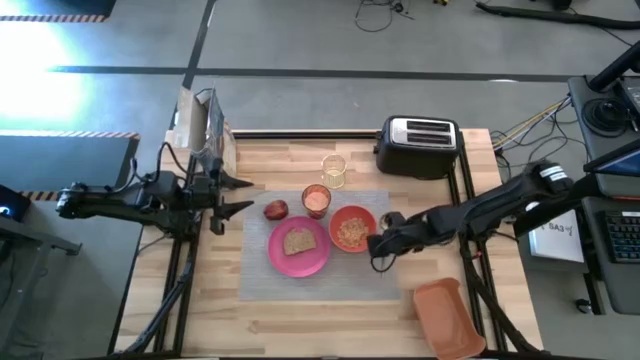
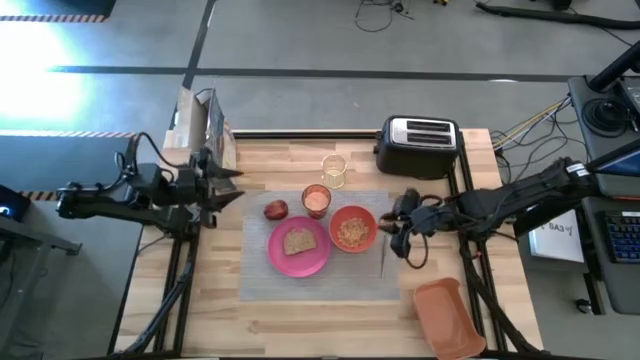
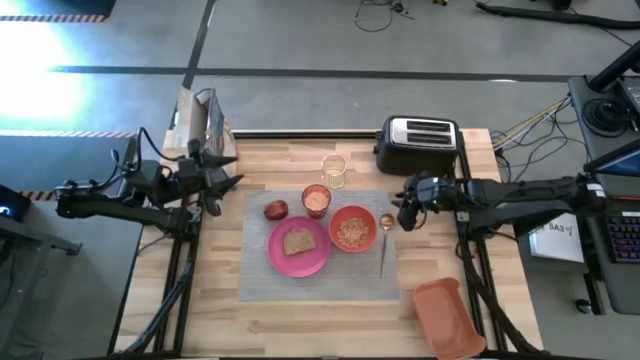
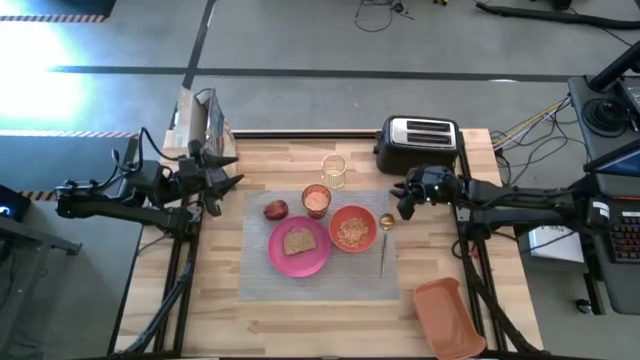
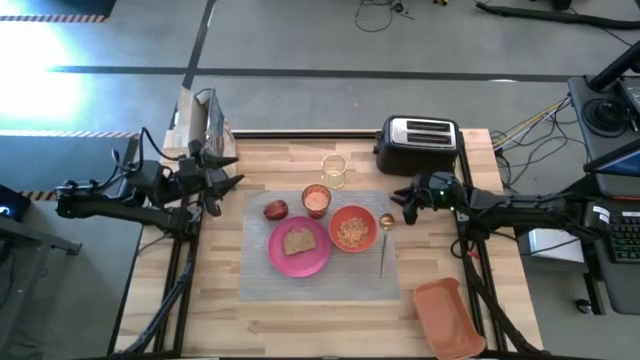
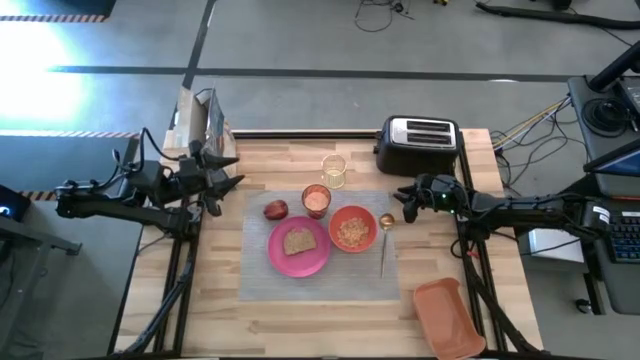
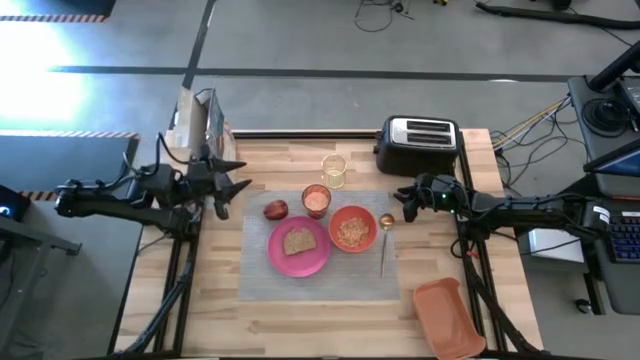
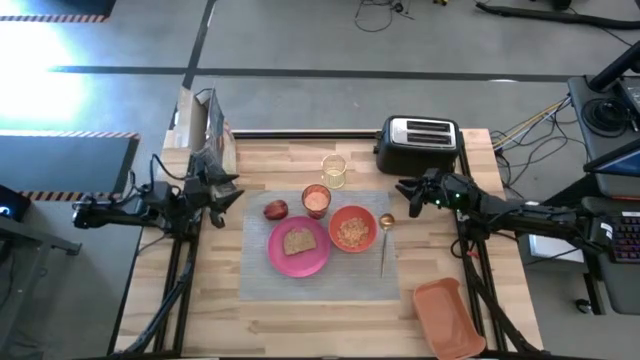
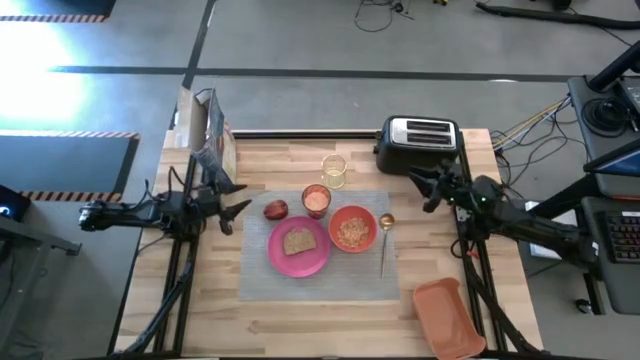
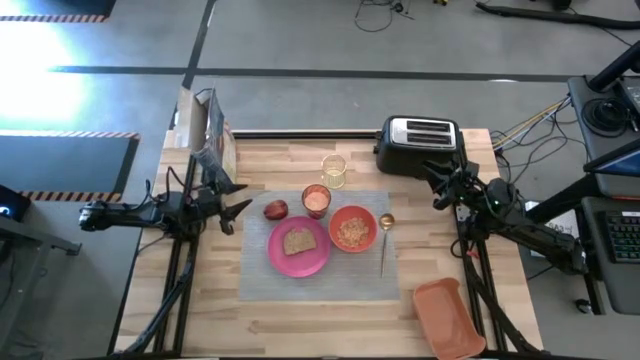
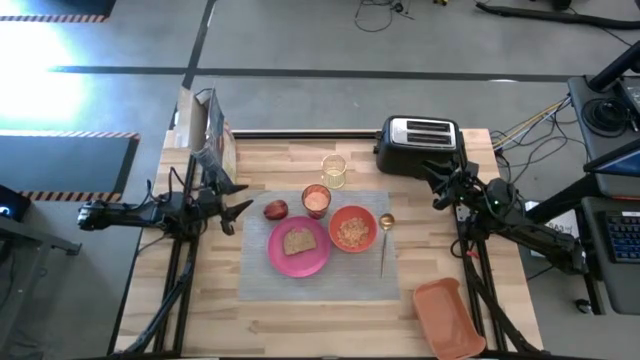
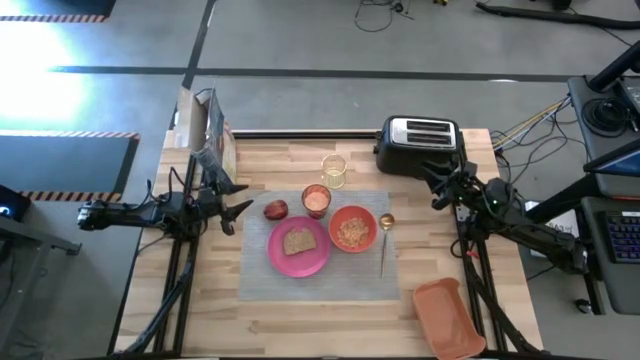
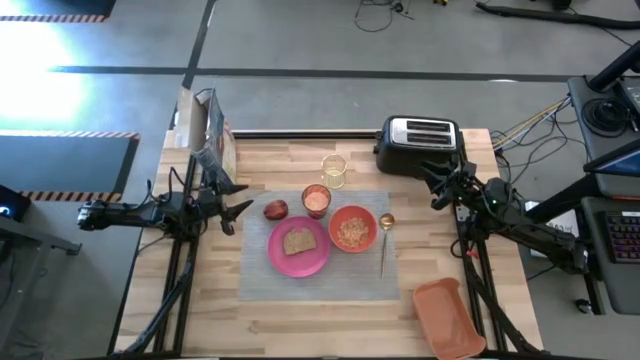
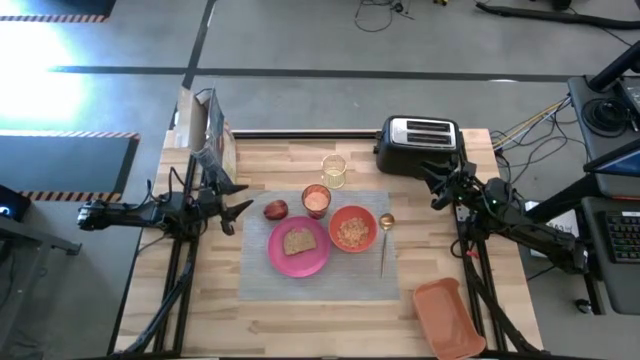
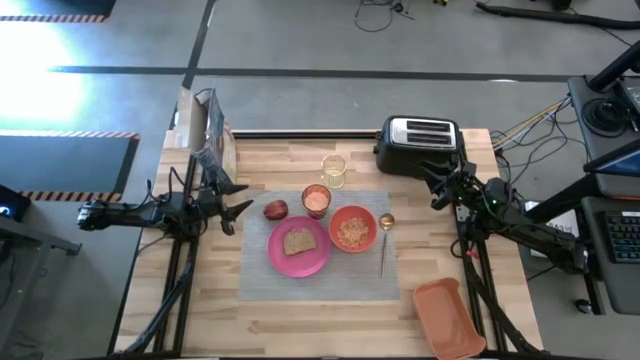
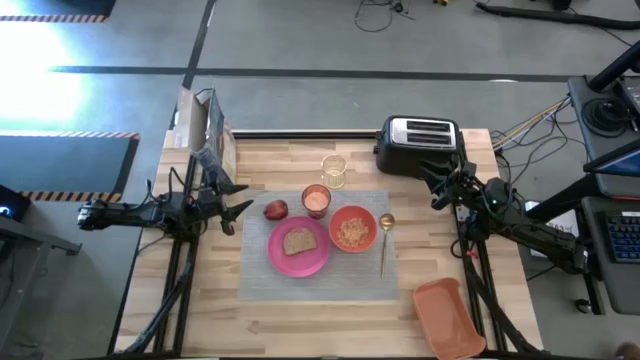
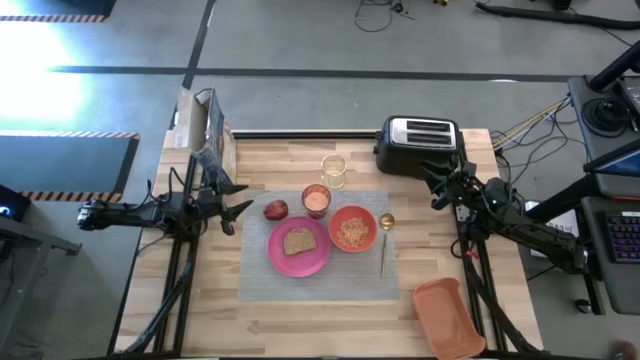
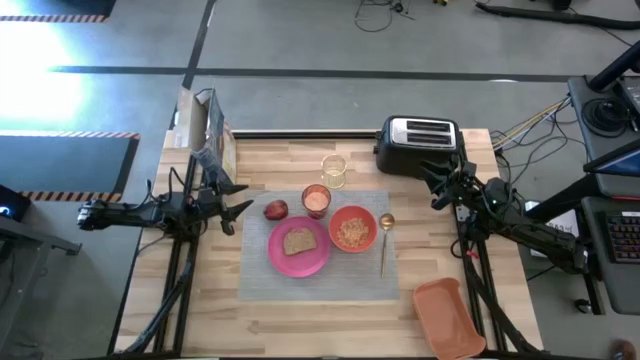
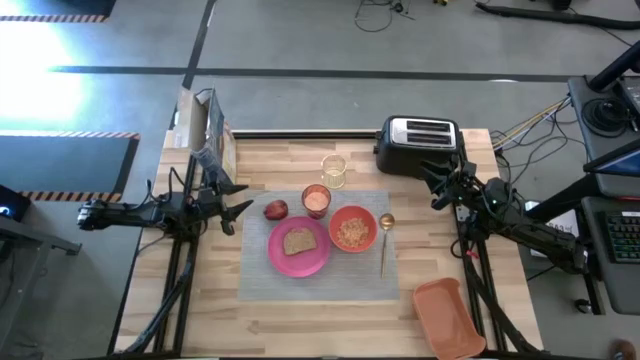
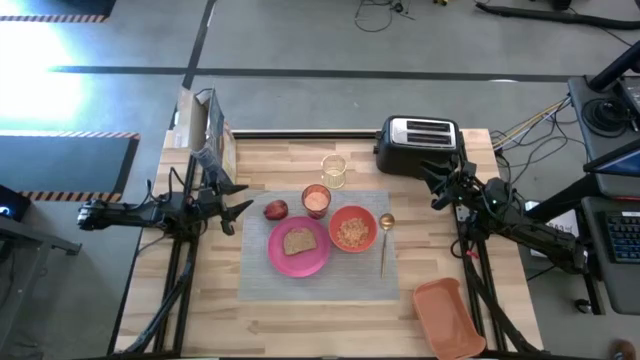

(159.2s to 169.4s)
Task: Arrange a breakfast setting
Return to Home Position

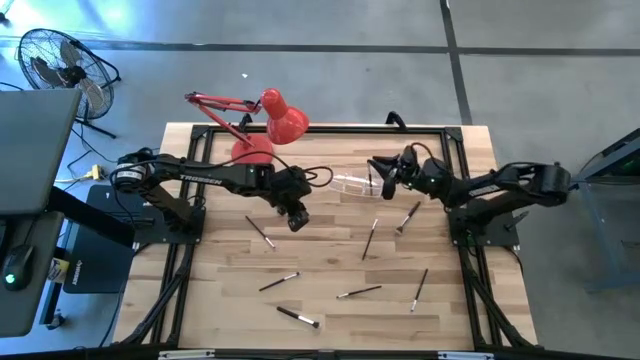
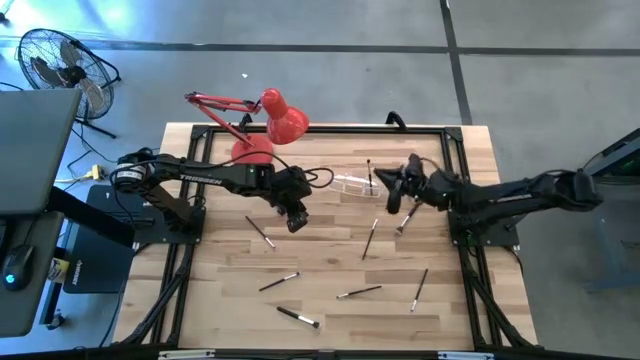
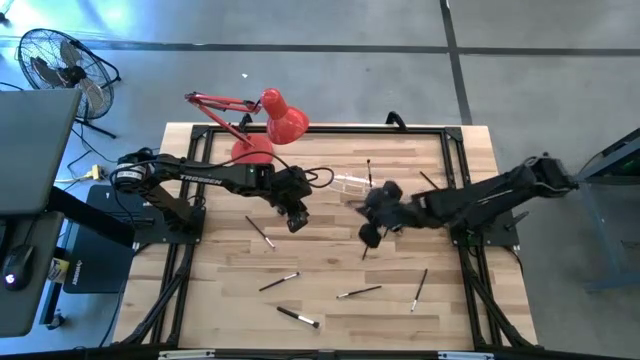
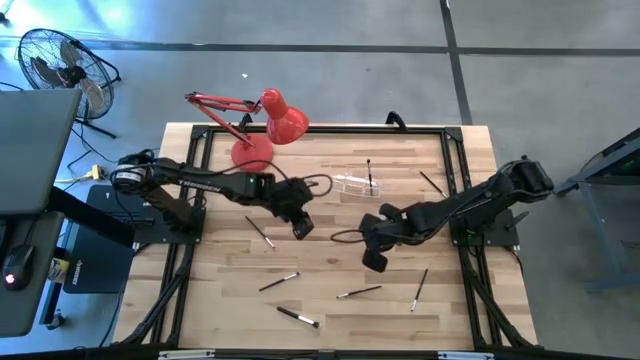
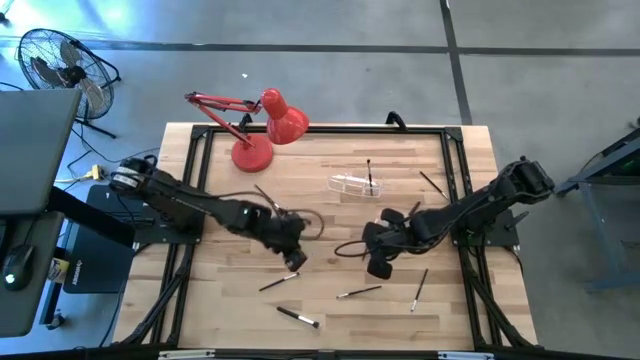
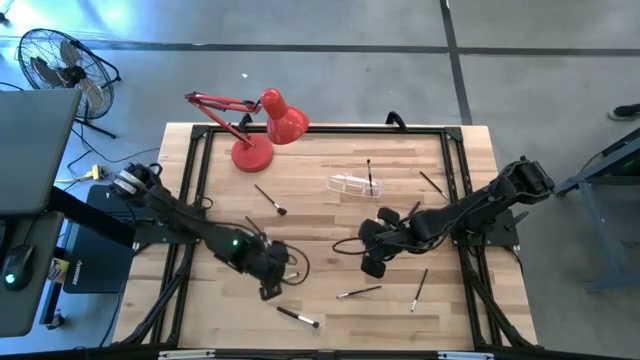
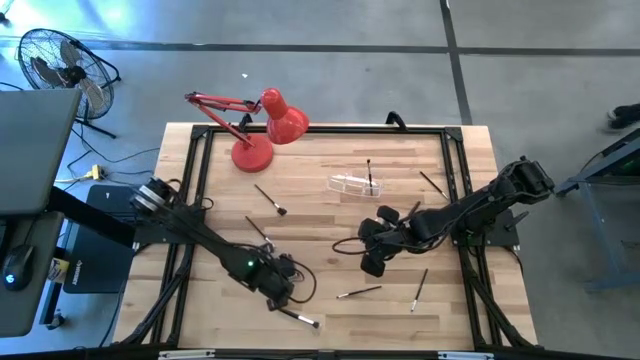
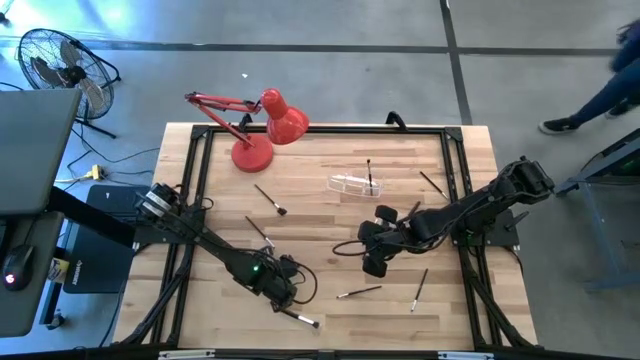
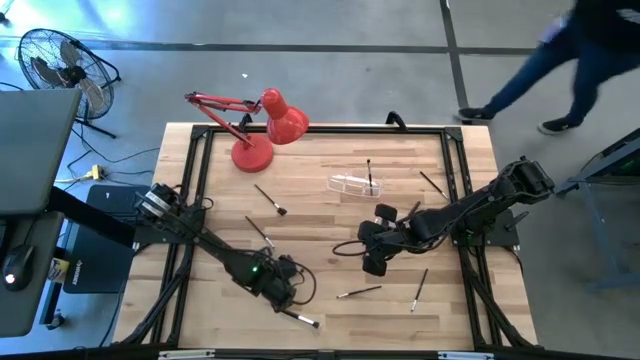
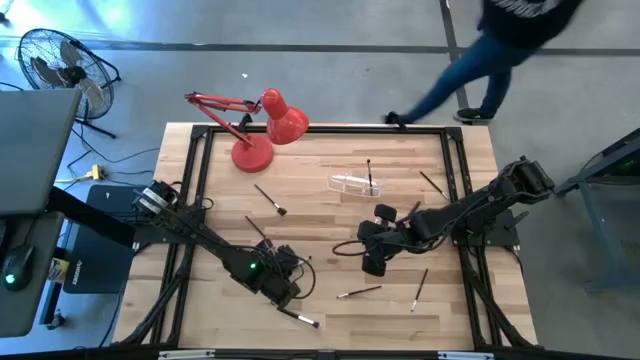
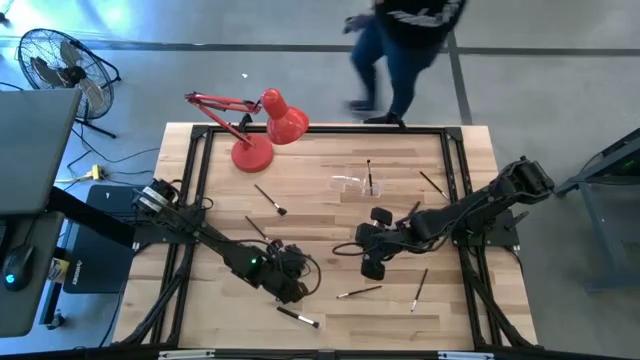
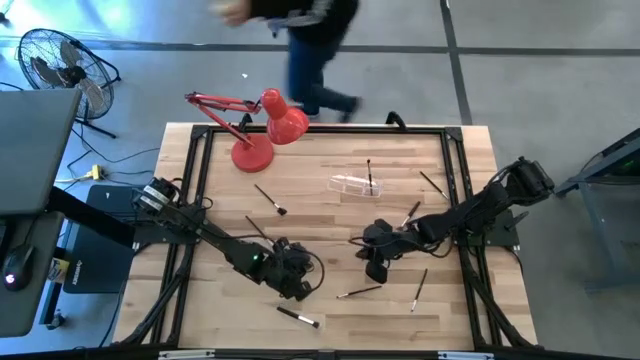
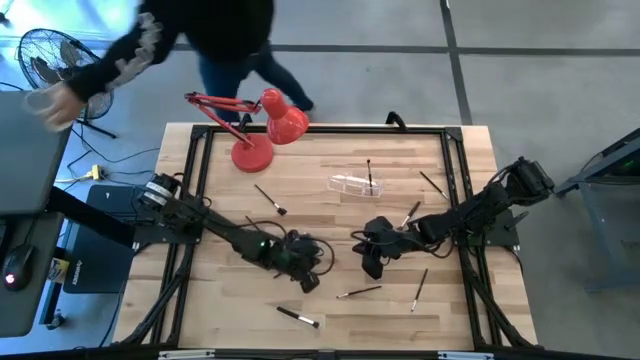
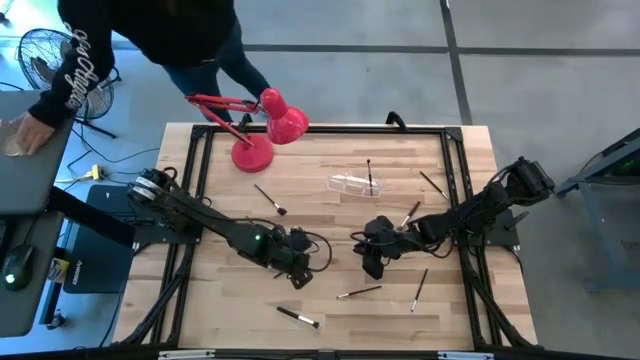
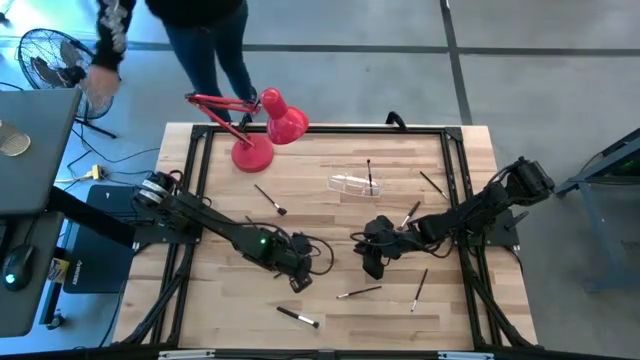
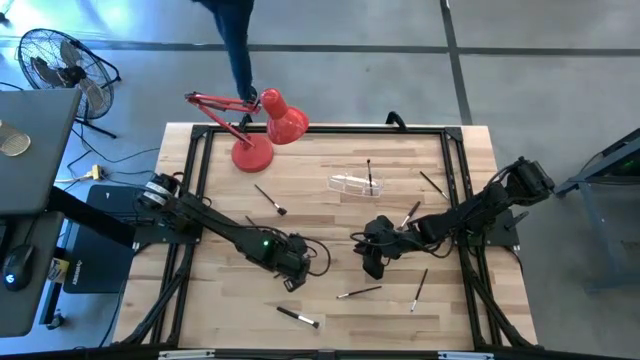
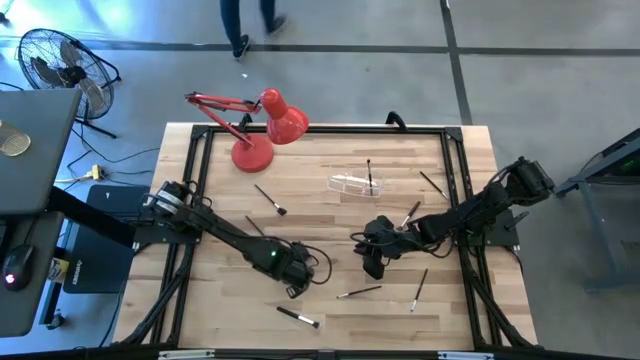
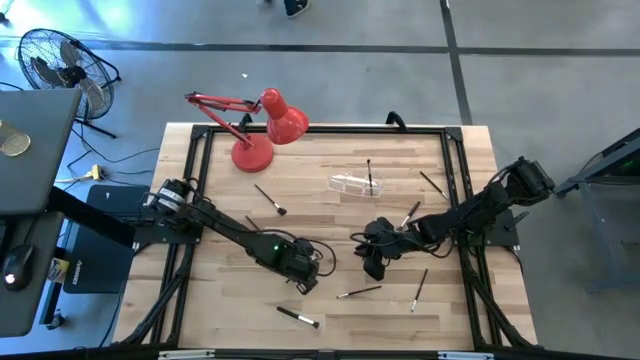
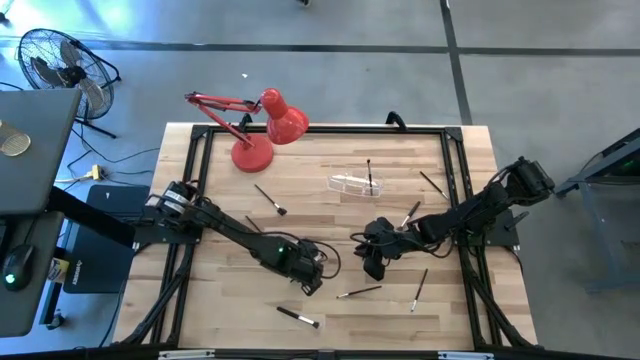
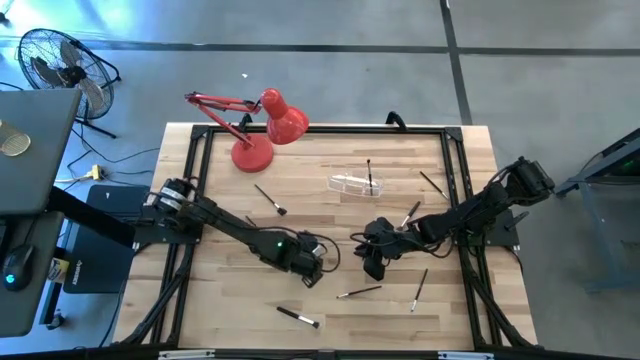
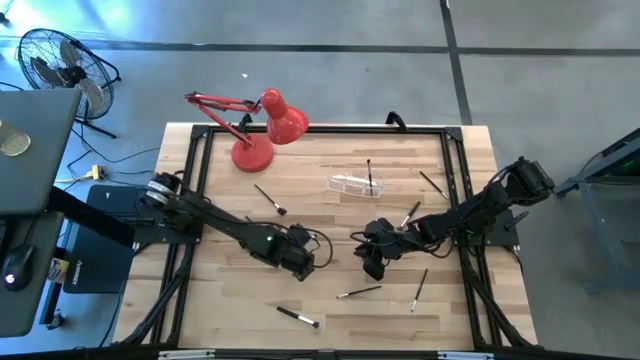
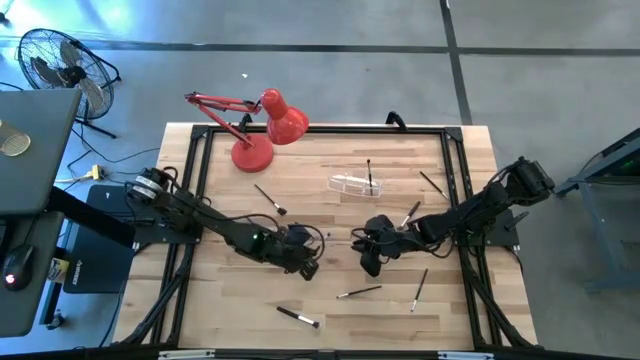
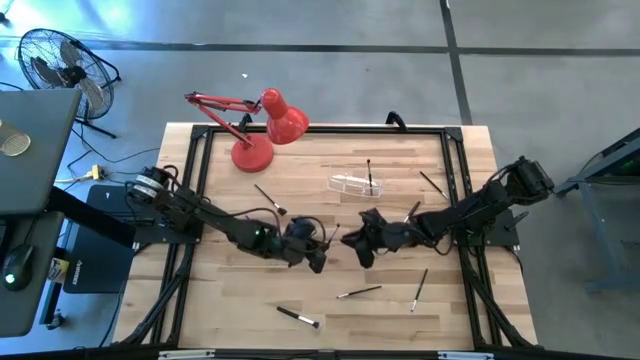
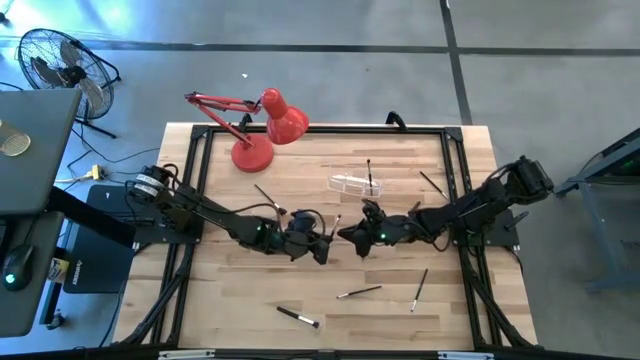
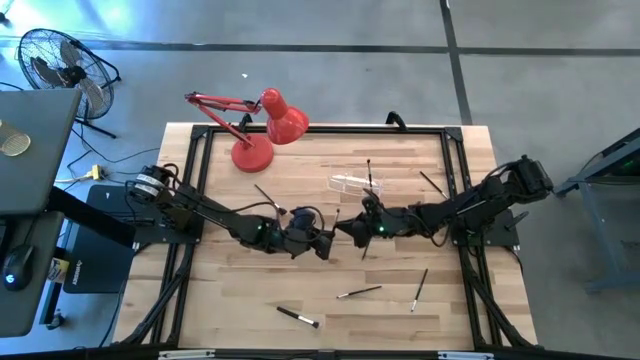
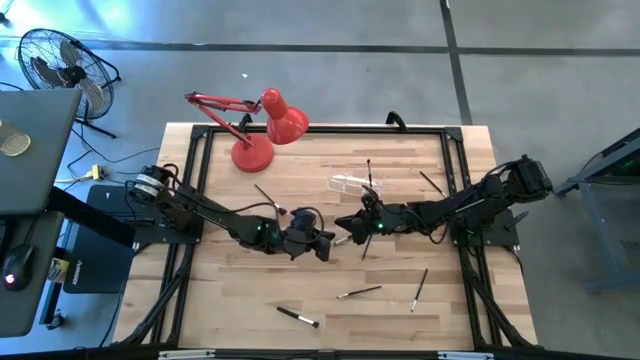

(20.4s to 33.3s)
Task: Put items in baskets/containers
Put the eyeshadow brush into the transparent organizer
